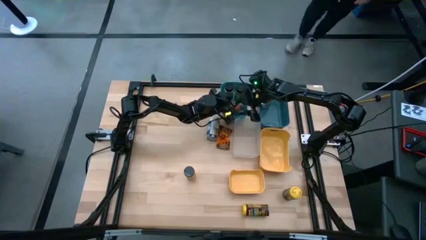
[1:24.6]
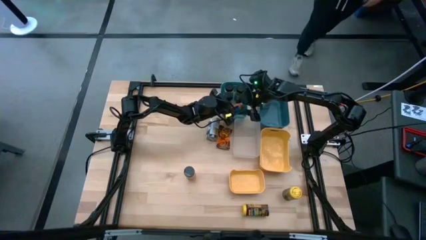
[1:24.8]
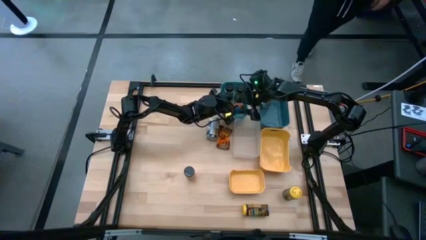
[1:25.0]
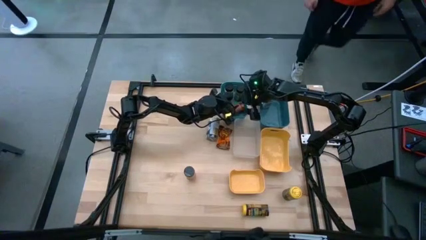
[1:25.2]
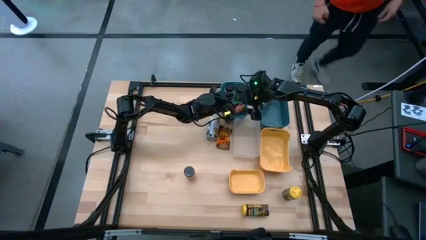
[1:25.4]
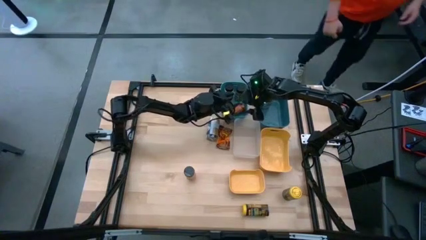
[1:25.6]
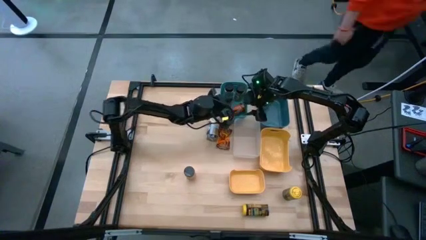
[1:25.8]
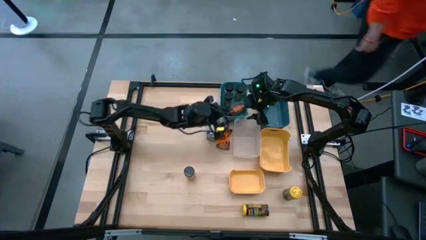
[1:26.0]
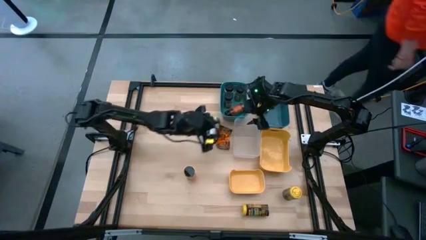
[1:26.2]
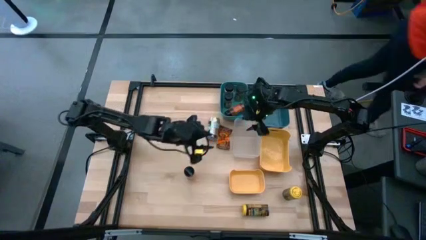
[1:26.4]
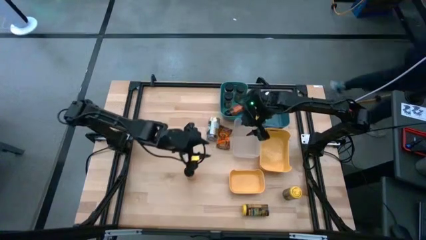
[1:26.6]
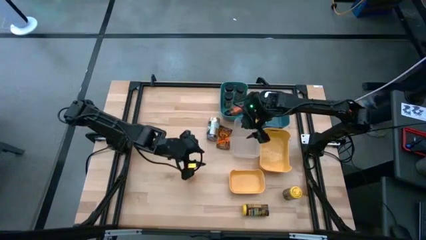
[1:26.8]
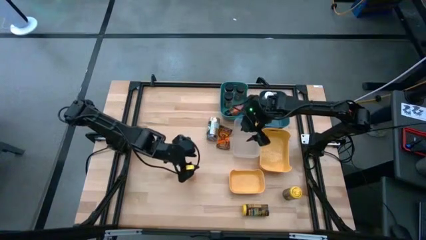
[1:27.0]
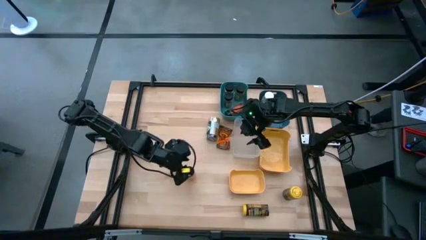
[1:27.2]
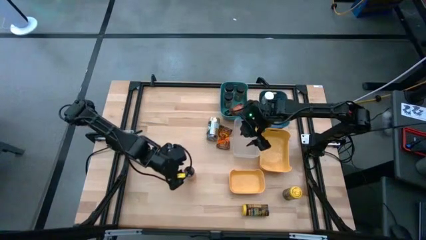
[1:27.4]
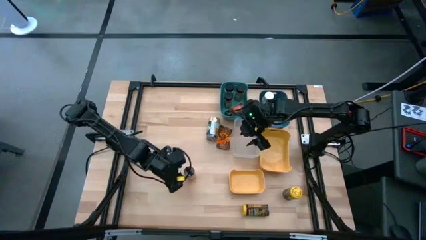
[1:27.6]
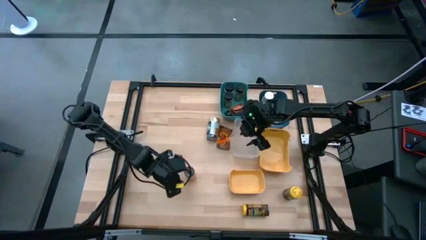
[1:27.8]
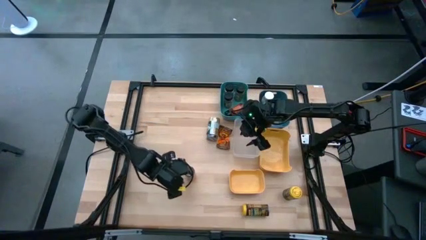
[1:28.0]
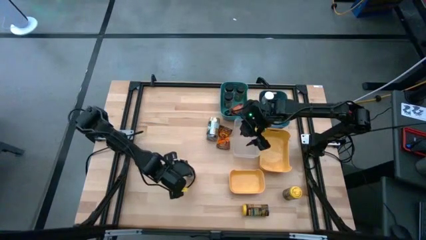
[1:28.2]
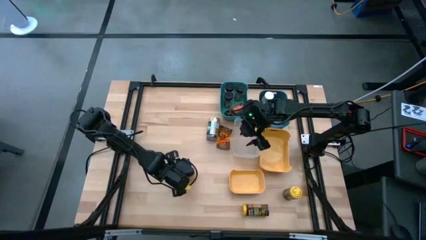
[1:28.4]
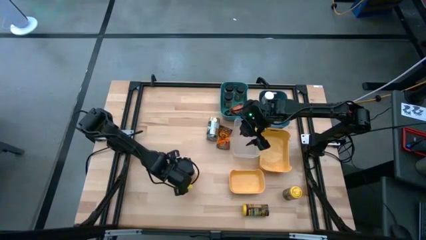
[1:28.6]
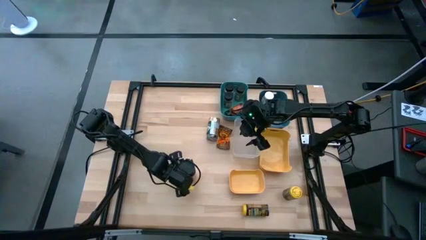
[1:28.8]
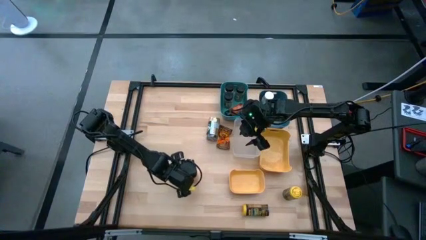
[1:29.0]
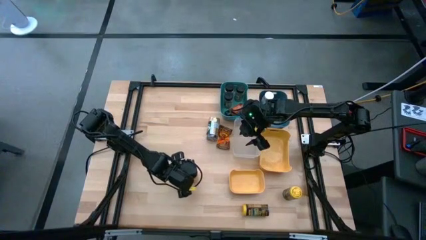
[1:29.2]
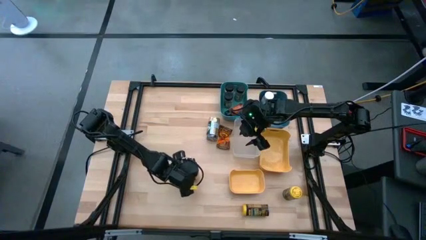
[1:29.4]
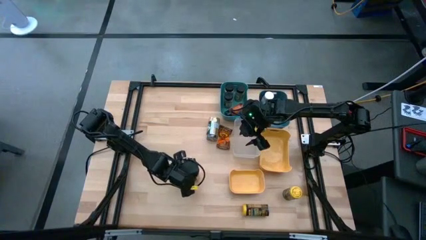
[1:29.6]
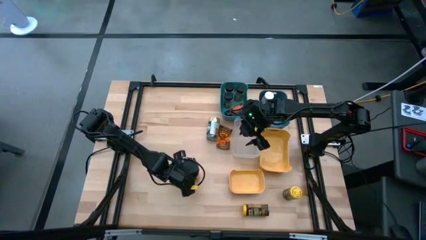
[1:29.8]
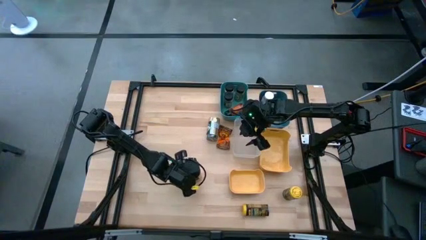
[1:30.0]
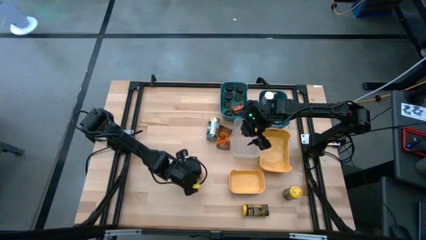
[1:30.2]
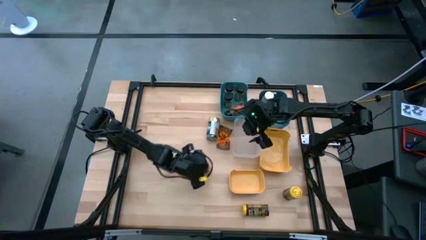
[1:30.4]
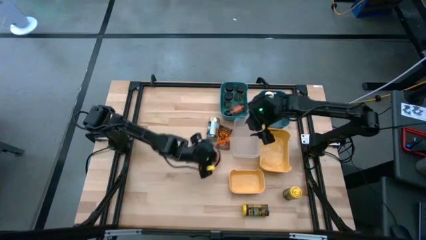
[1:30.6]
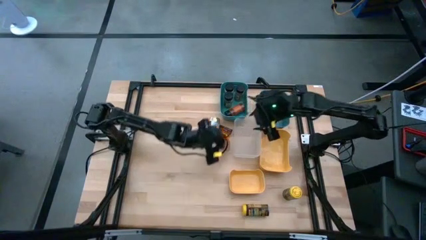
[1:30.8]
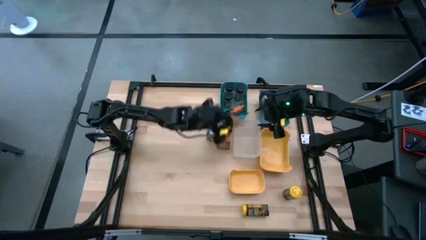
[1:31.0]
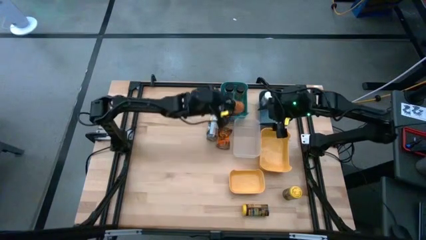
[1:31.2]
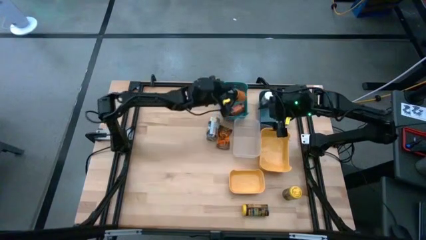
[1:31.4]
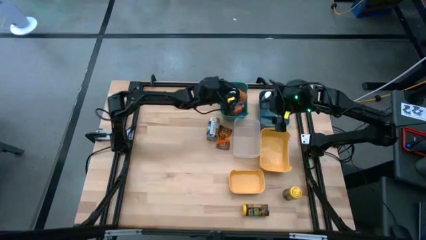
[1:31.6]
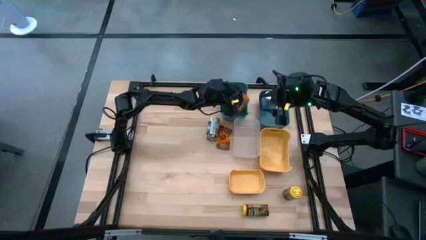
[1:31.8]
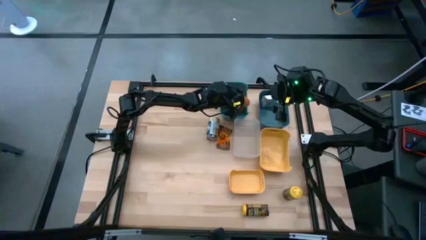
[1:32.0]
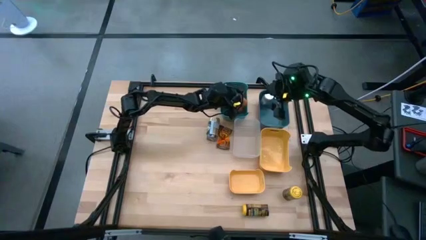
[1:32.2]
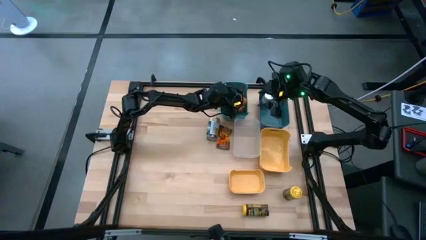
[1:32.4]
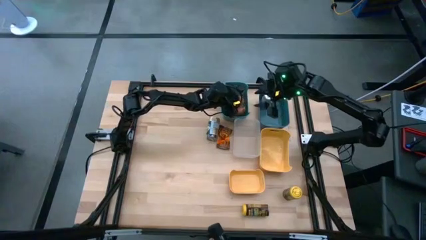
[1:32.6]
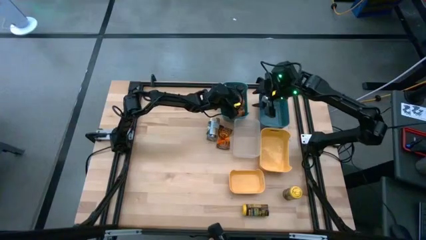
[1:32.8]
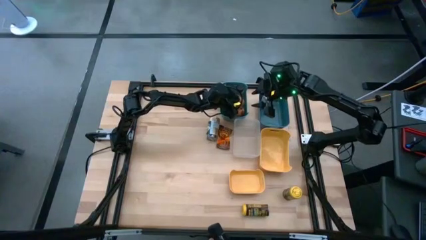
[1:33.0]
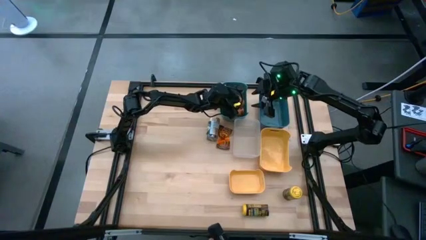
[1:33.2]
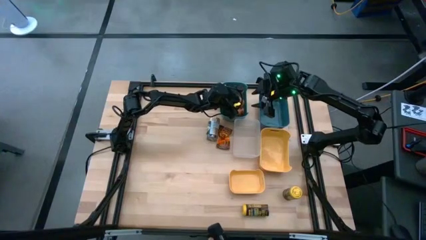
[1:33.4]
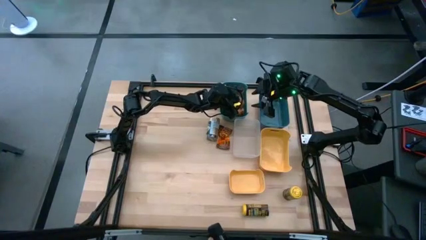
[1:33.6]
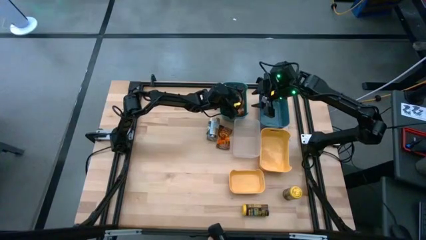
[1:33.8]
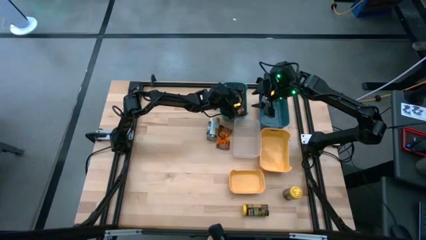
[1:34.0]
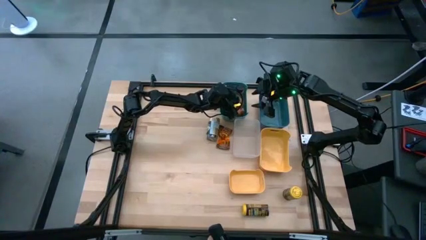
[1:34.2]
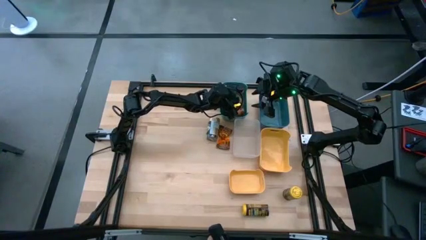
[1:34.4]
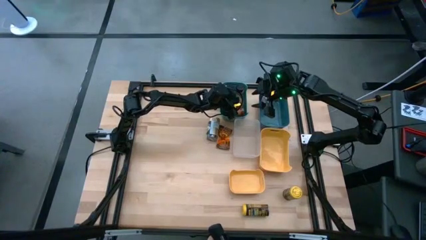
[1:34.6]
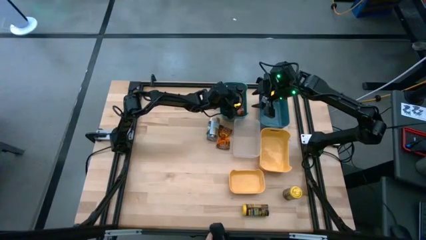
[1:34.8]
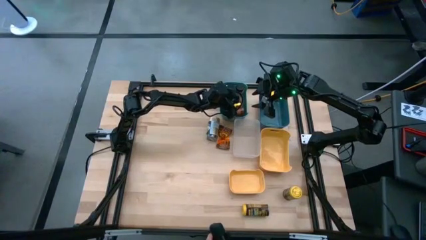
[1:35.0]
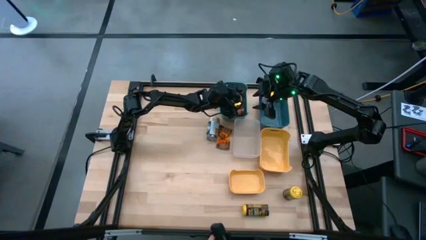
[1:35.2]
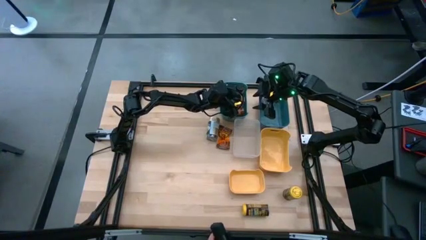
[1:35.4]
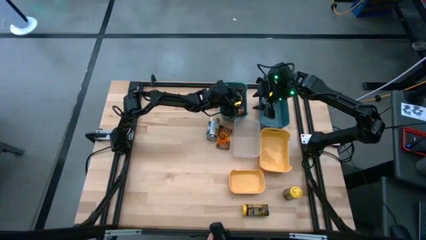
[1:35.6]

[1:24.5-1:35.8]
Task: Sort spices by type
Put the yellow seasoning into the green bin

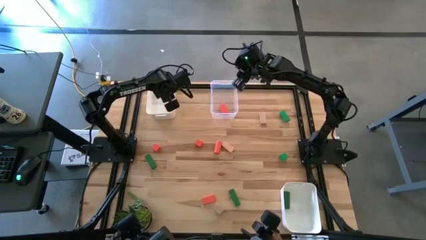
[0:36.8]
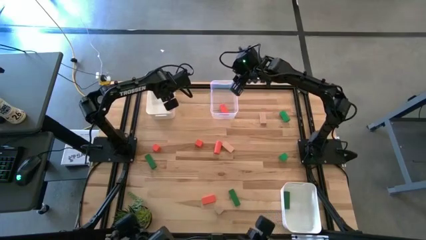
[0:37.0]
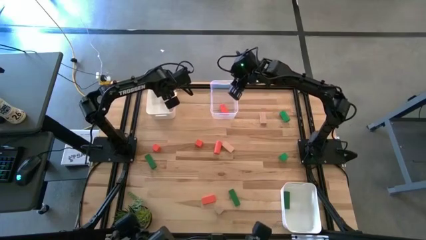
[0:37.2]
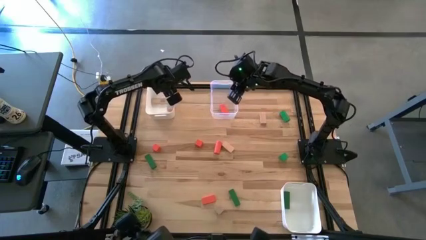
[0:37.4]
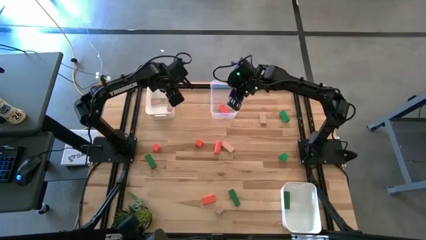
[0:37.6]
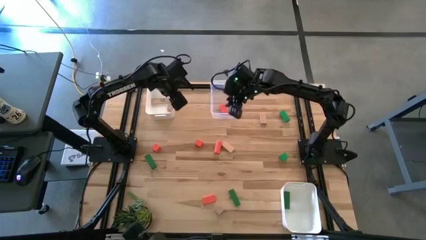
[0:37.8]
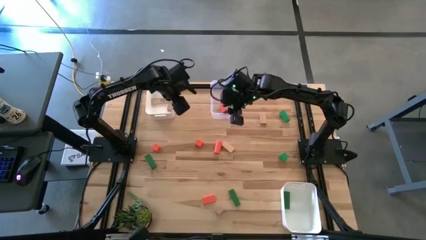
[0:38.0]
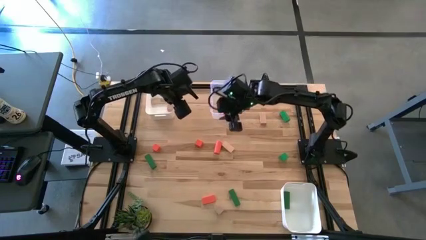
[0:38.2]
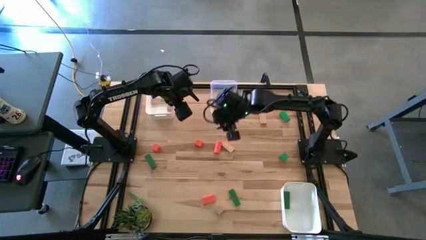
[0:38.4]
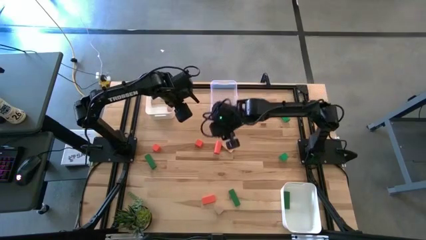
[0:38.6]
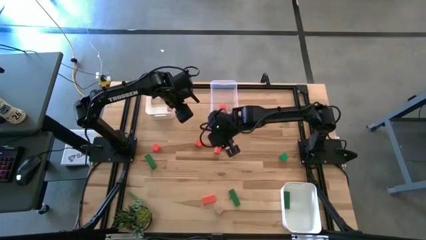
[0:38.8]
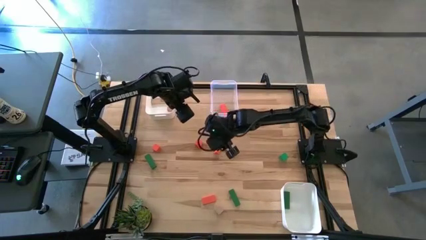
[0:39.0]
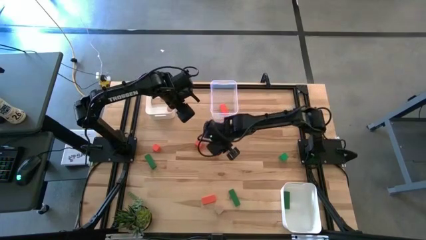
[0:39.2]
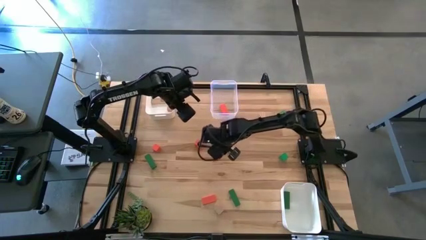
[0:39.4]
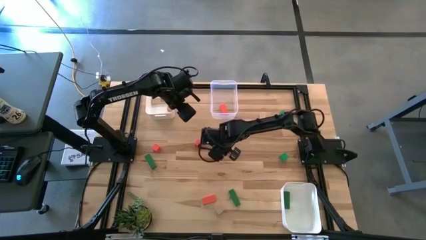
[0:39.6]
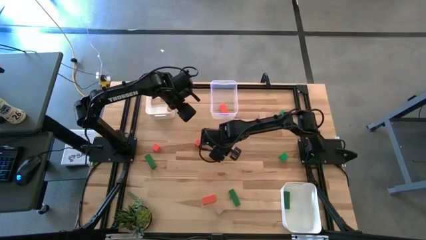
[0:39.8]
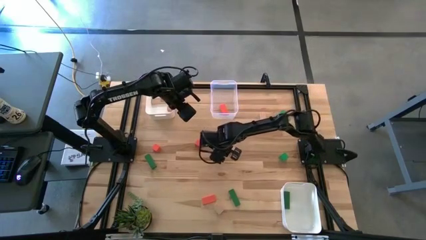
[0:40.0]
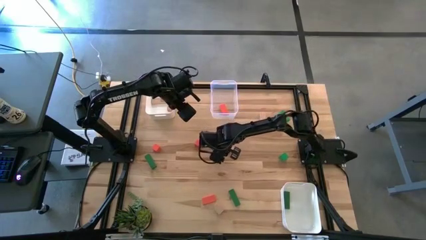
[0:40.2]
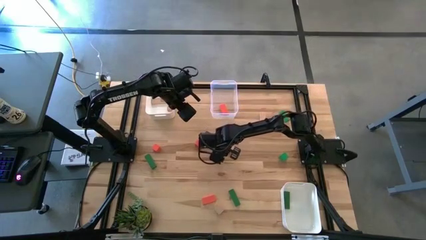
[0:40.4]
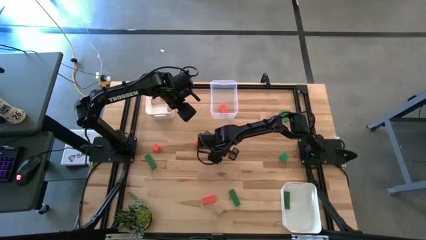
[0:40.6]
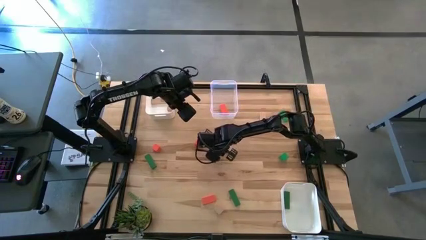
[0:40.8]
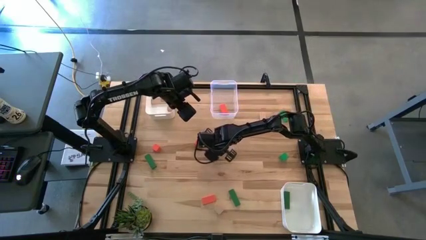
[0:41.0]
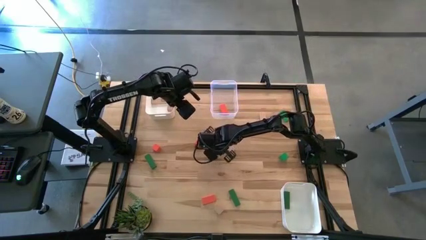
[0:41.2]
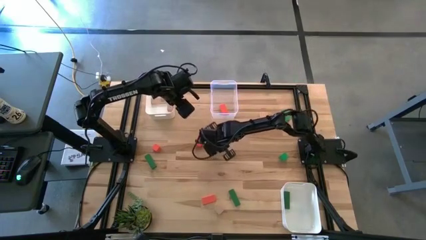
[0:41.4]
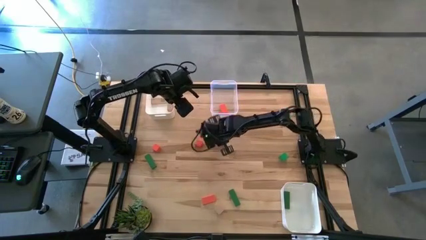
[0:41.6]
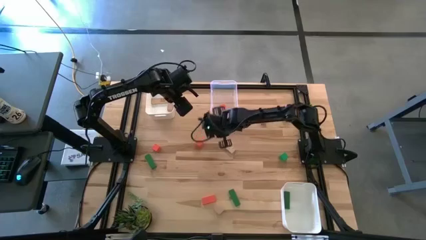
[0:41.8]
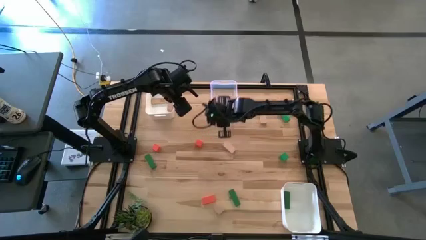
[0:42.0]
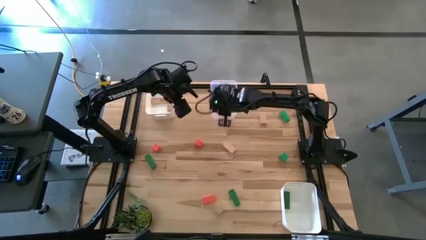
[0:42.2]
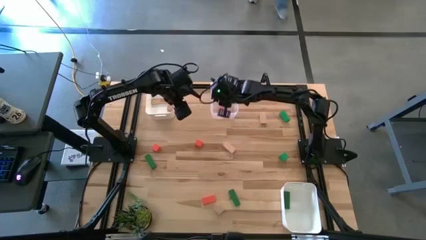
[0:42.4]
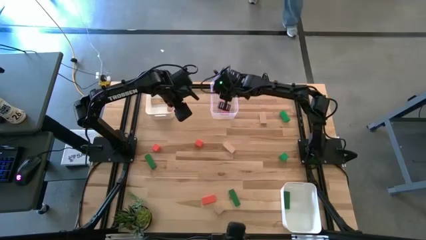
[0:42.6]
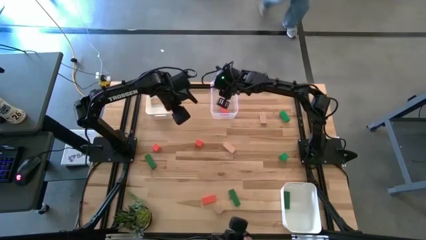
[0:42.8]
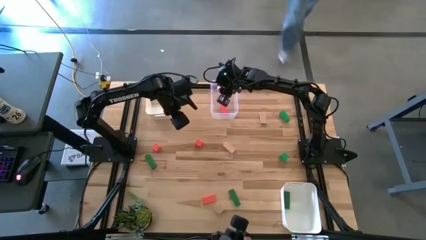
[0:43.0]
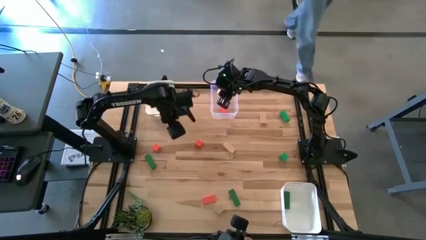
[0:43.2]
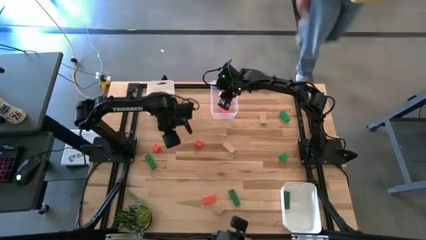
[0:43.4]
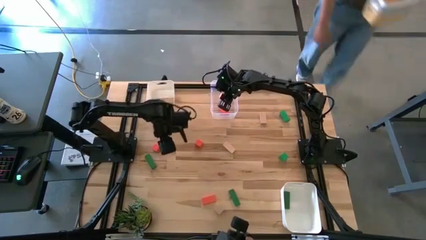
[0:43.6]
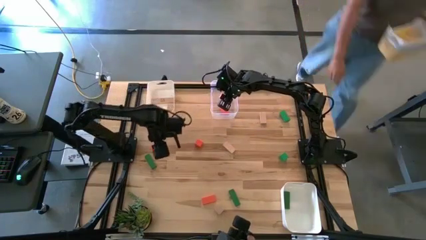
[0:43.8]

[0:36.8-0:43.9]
Task: Sort & place blocks by color
Put the orange block into the transparent bin
